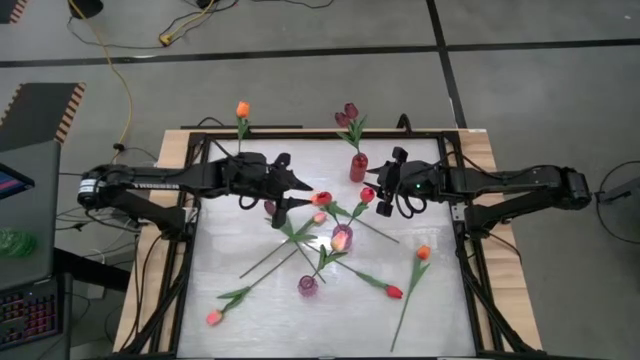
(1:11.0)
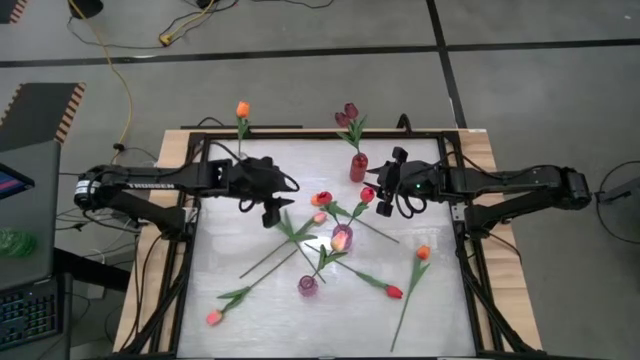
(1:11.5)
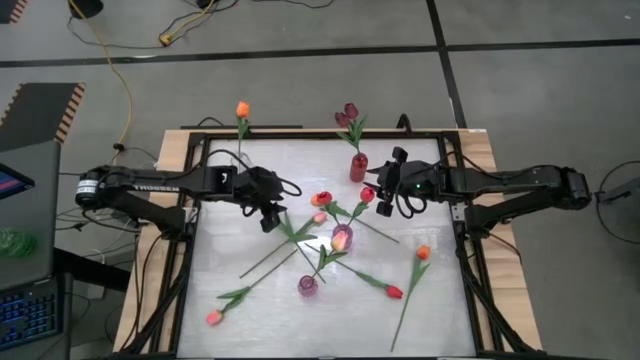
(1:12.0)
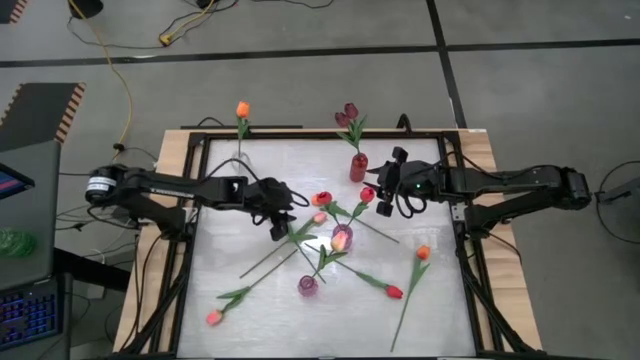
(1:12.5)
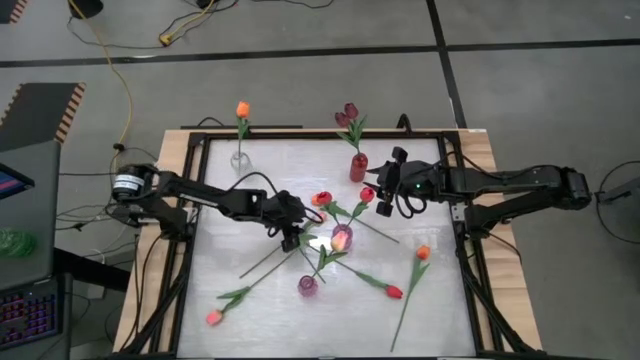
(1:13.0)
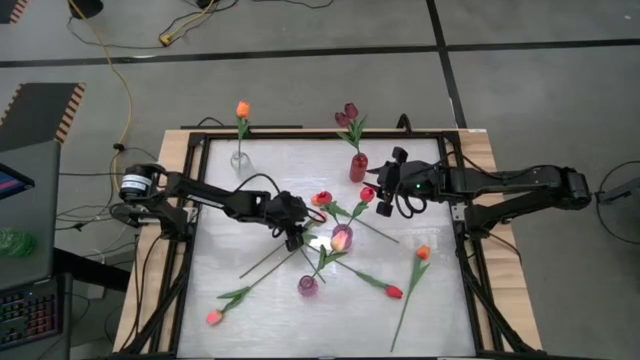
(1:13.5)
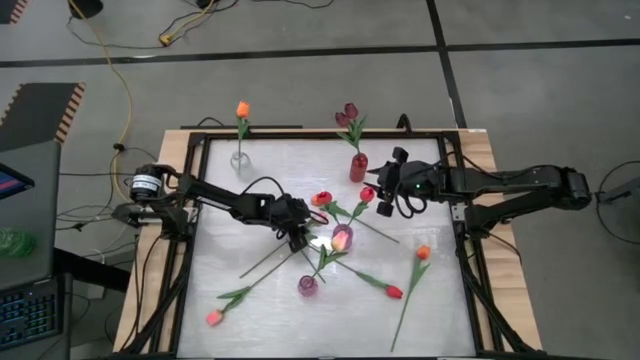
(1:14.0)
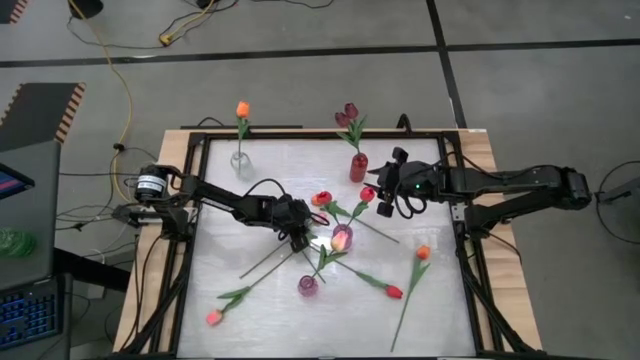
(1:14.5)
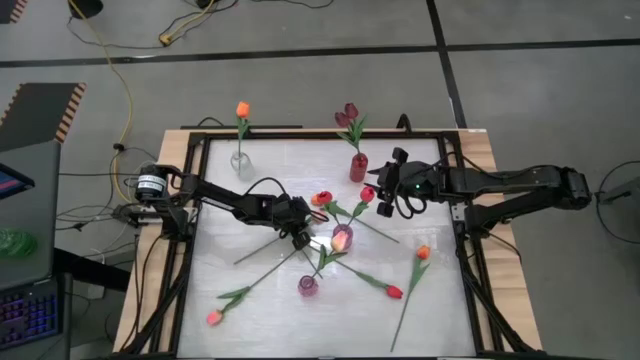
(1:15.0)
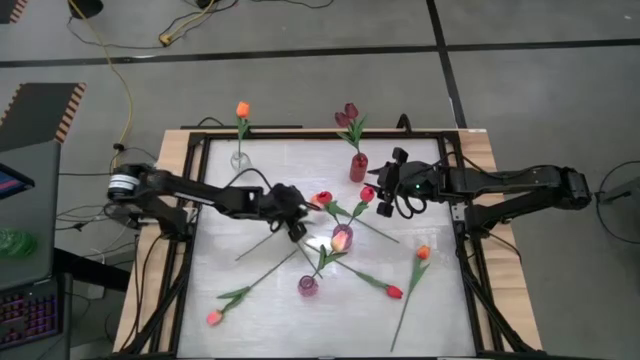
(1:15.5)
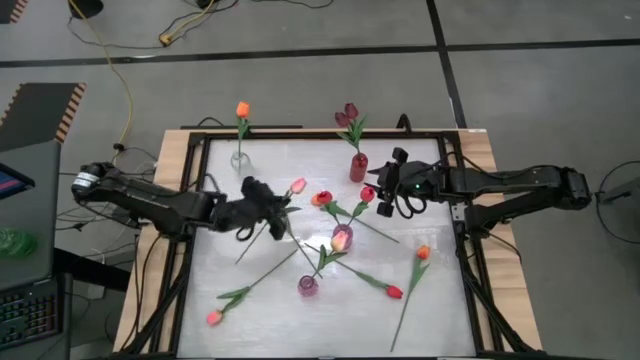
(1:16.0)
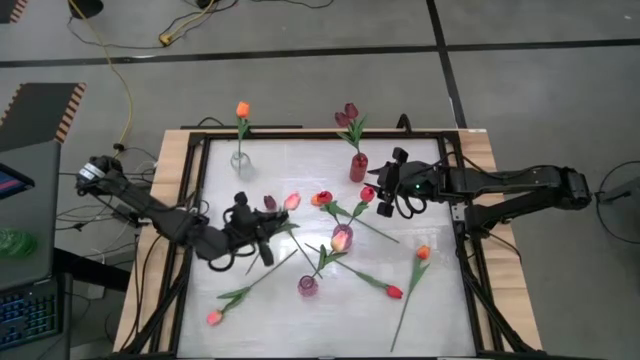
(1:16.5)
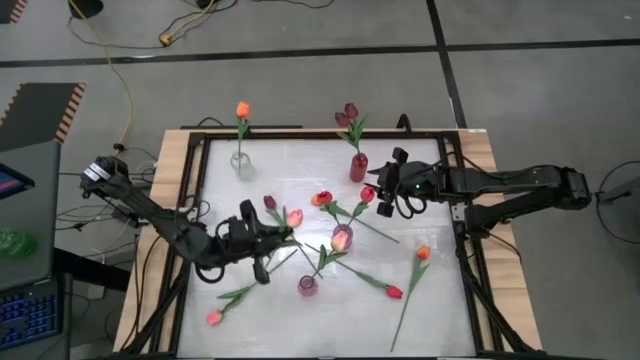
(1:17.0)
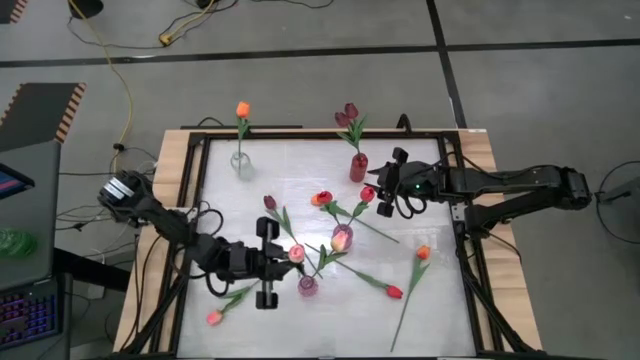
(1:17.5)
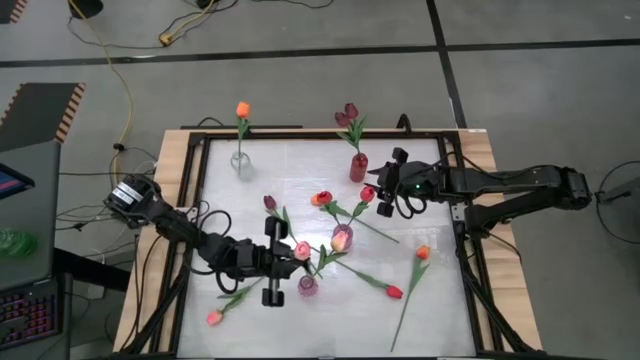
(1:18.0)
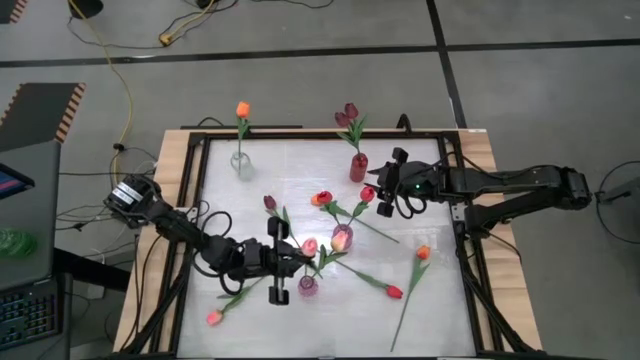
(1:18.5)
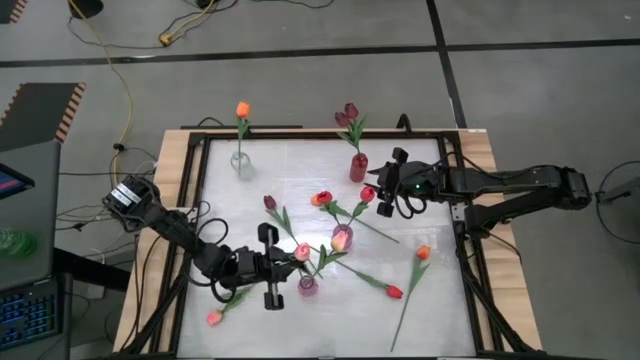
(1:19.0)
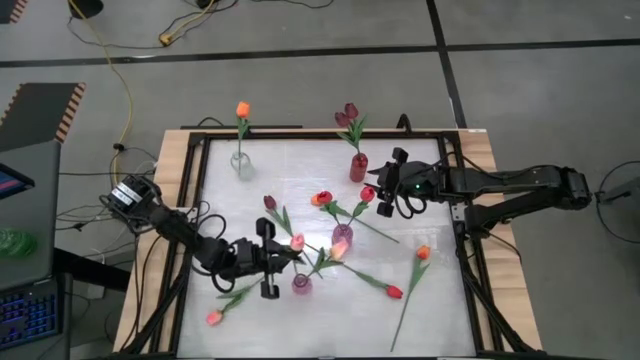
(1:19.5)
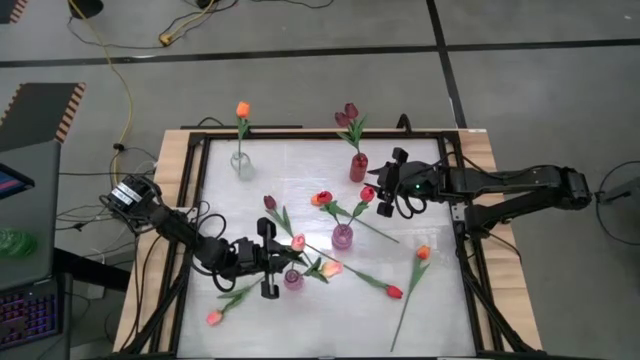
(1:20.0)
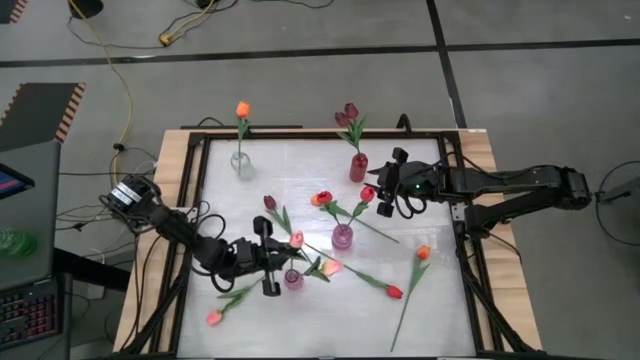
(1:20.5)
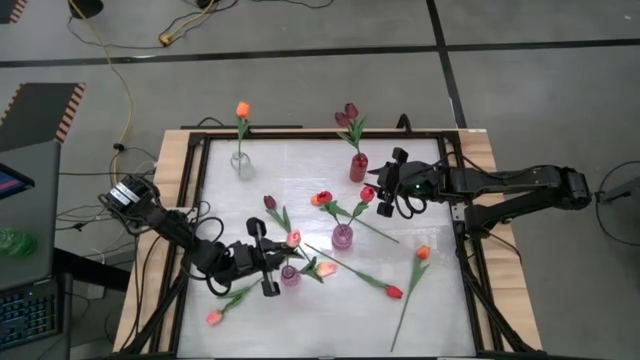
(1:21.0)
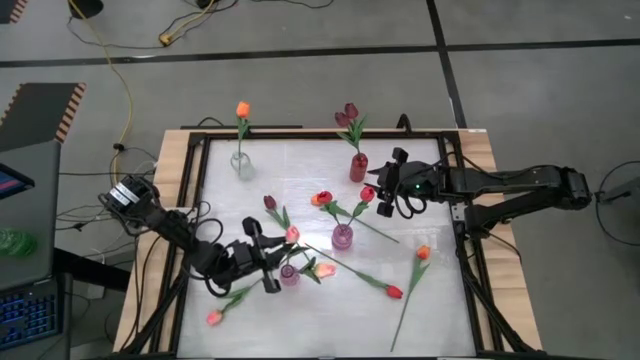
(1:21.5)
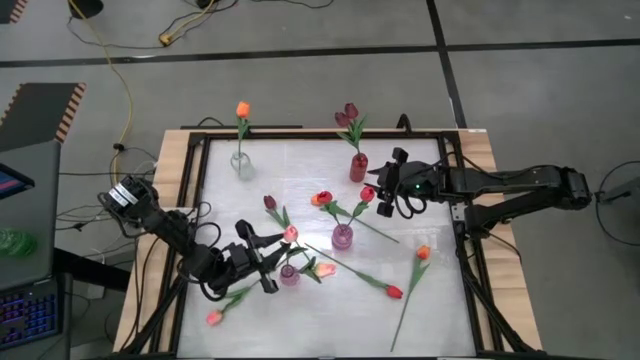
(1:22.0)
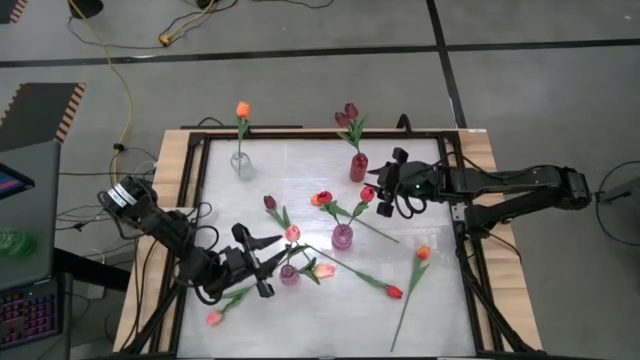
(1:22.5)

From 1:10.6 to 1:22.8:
Task: Sort flowers into vase by color
Put the top pink flower into the bottom purple vase

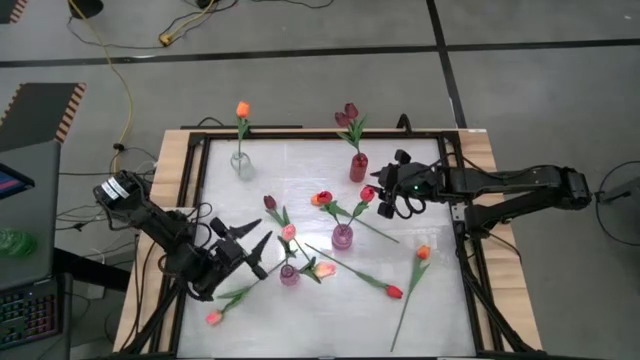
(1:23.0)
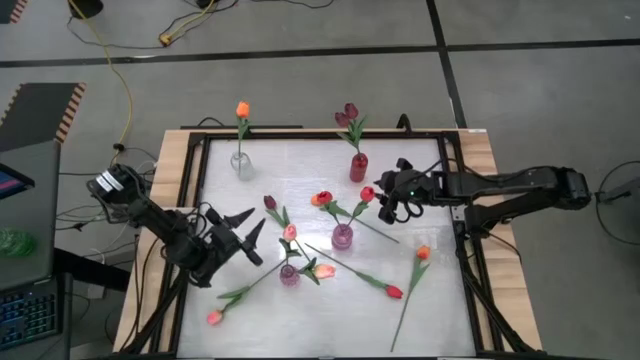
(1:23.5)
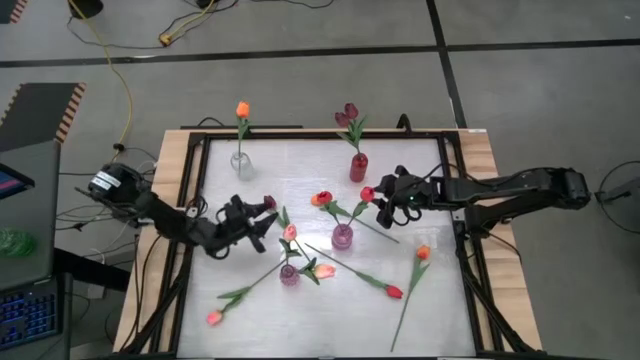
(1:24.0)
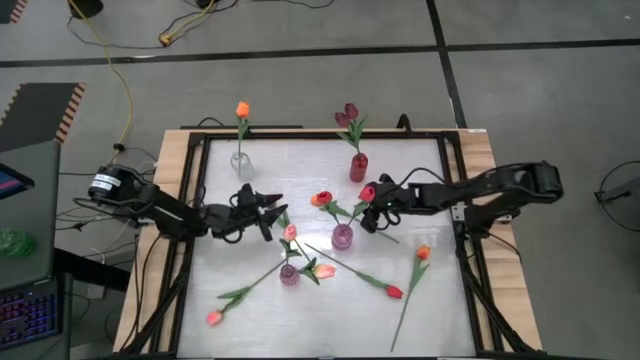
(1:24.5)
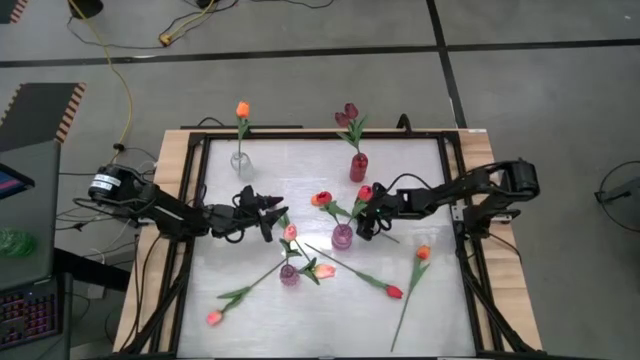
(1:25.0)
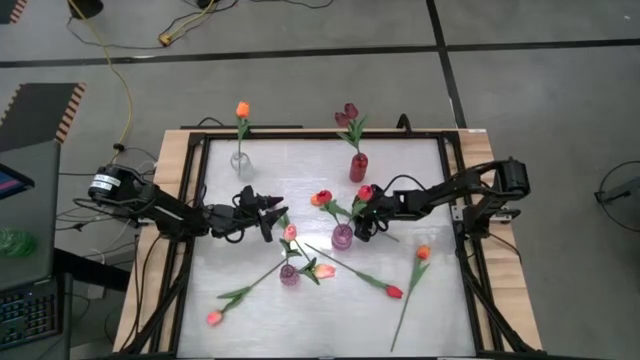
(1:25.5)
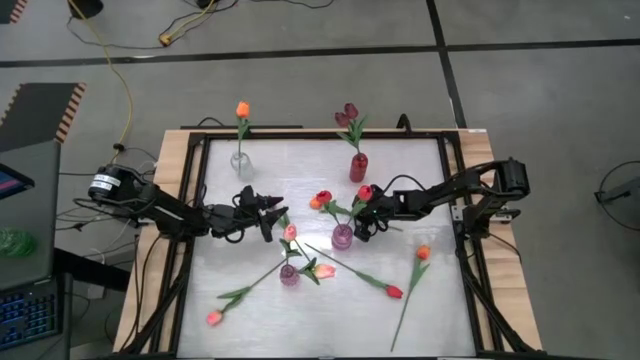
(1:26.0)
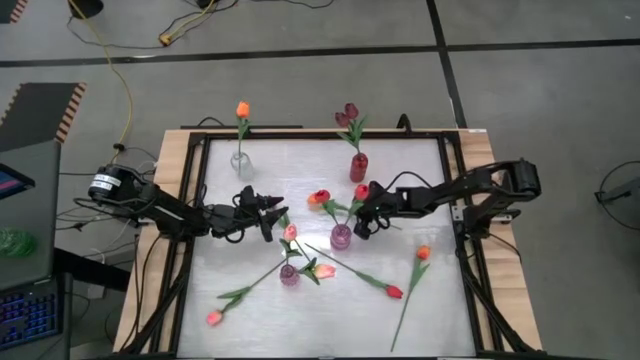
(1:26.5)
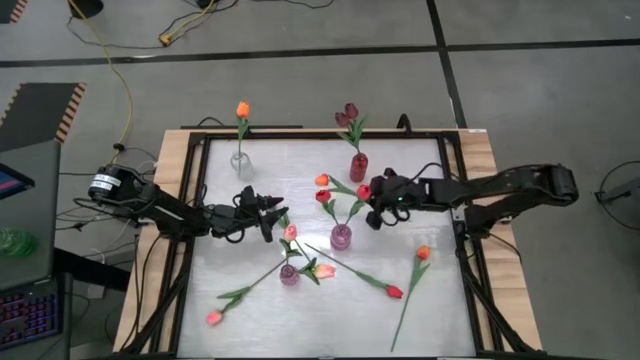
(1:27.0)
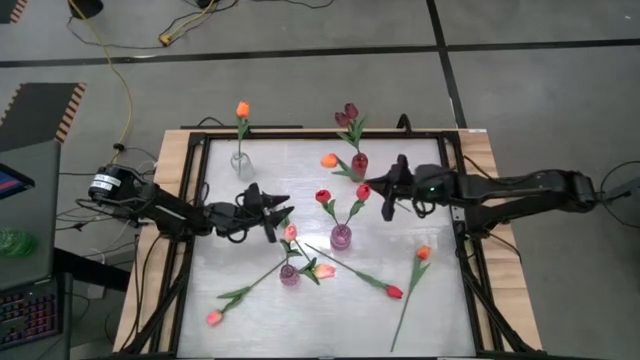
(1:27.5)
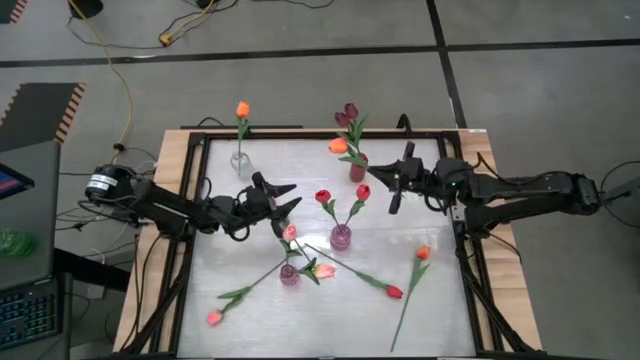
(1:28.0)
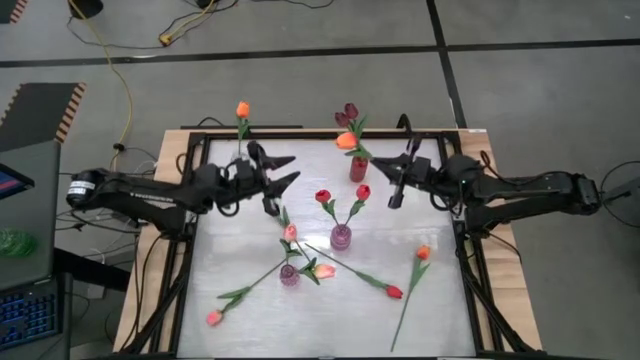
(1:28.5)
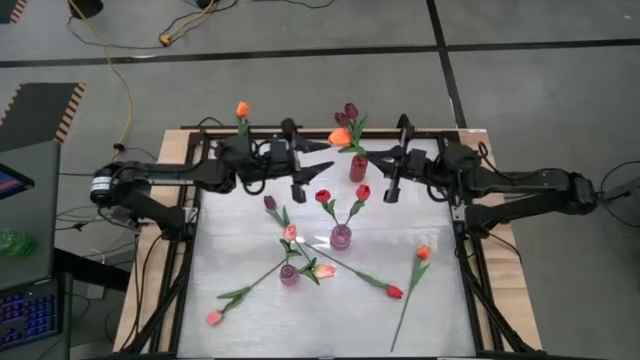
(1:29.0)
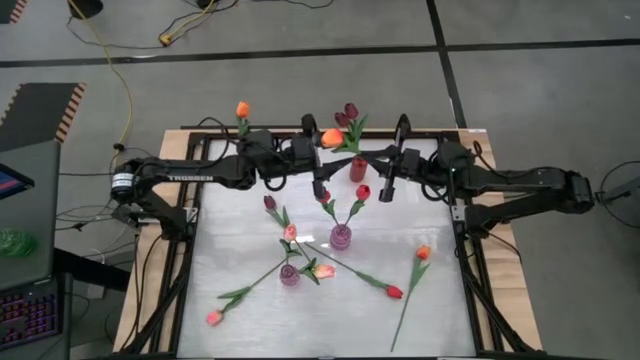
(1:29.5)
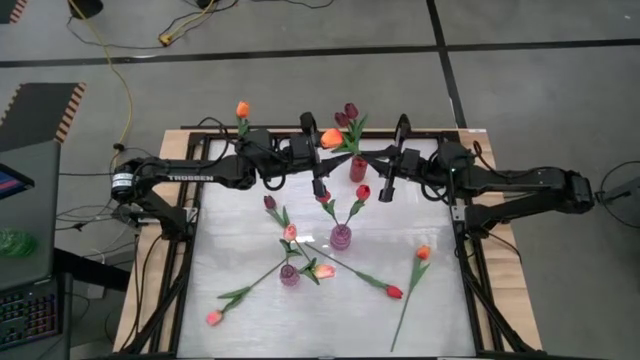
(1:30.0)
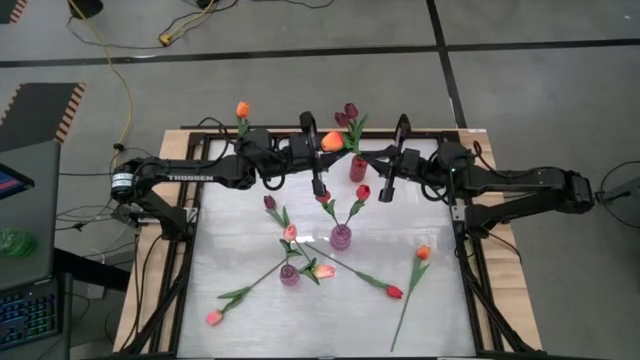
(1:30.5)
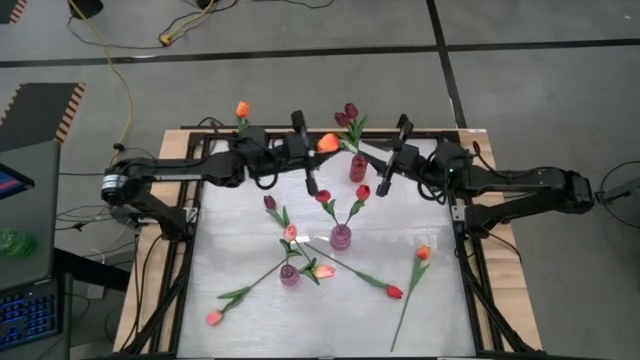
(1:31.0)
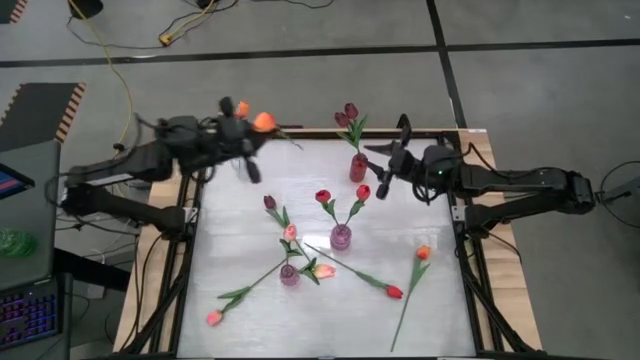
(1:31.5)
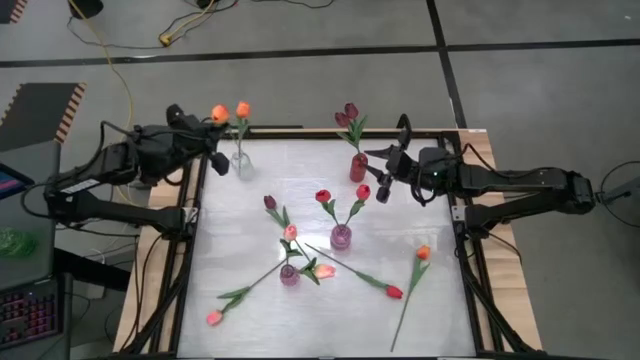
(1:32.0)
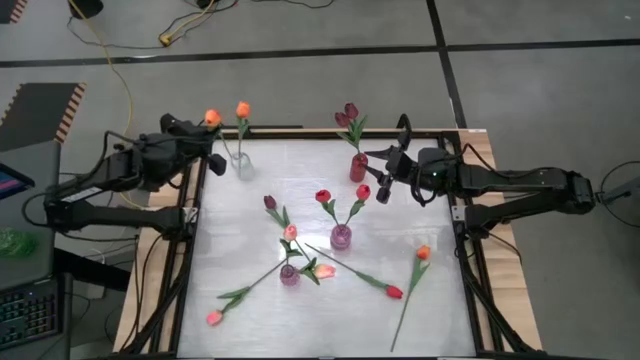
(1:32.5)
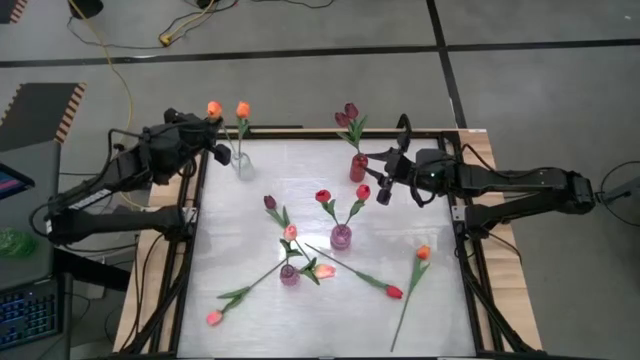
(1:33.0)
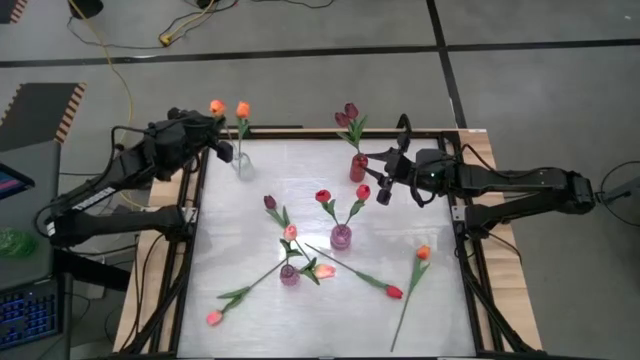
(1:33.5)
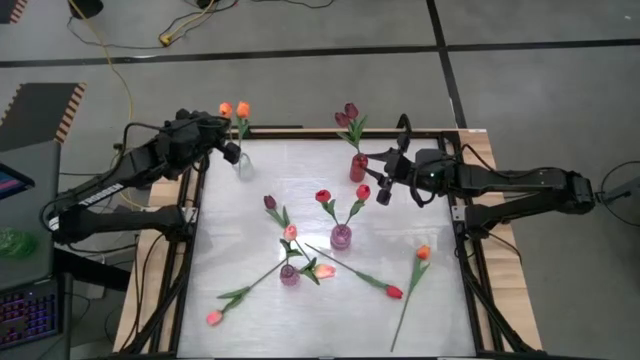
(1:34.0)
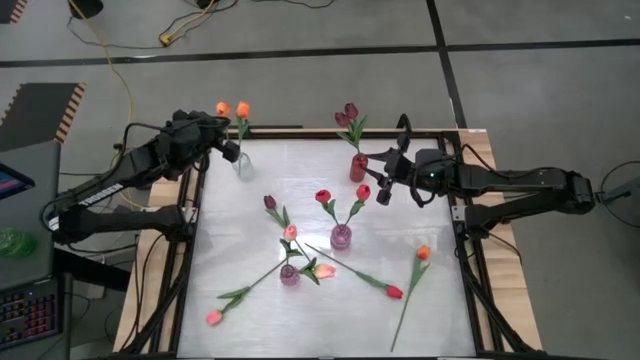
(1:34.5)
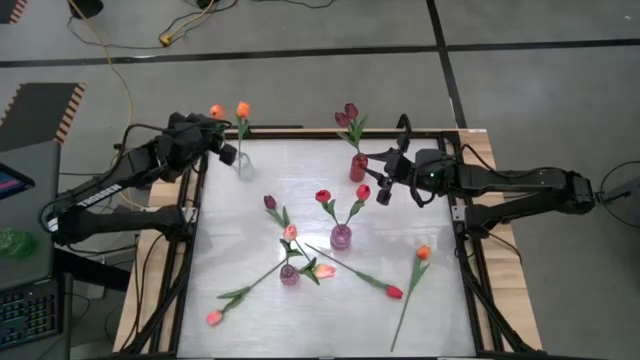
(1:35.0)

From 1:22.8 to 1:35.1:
Put the top orange flower into the clear vase
